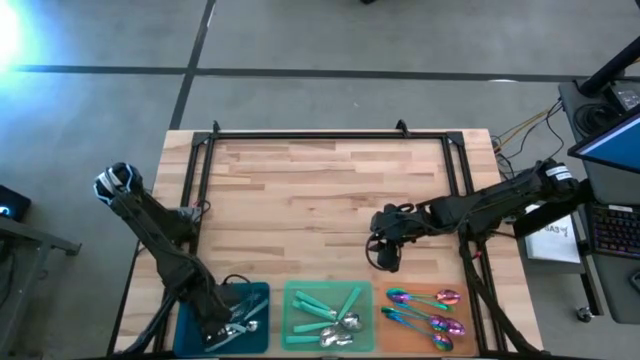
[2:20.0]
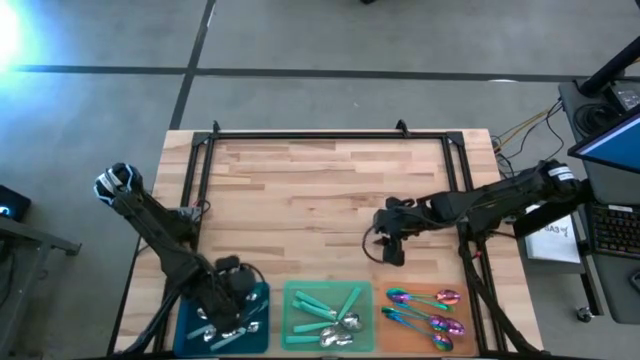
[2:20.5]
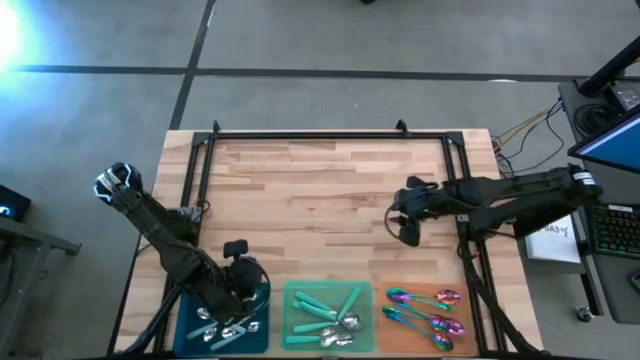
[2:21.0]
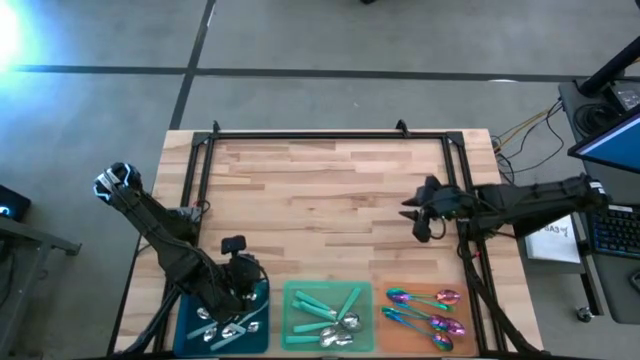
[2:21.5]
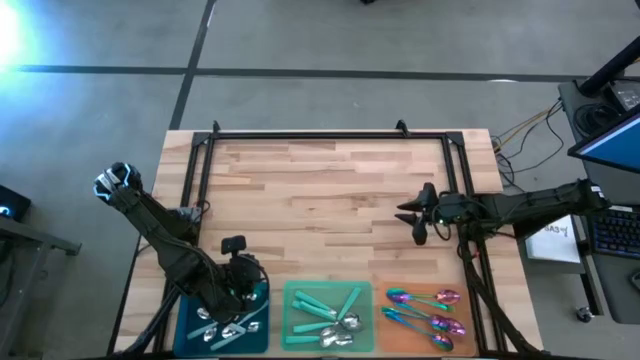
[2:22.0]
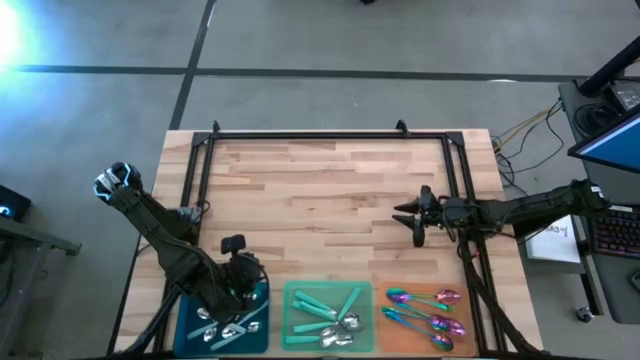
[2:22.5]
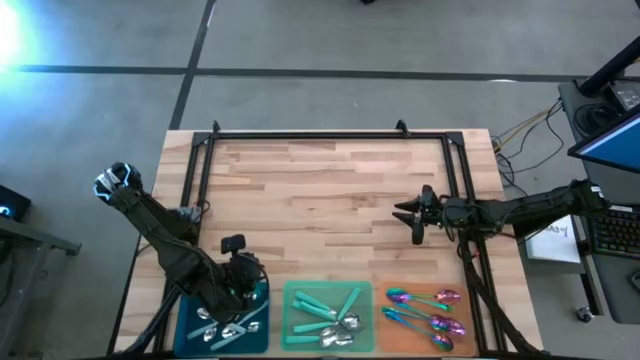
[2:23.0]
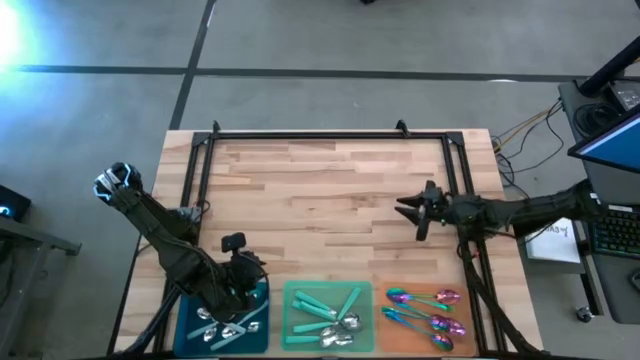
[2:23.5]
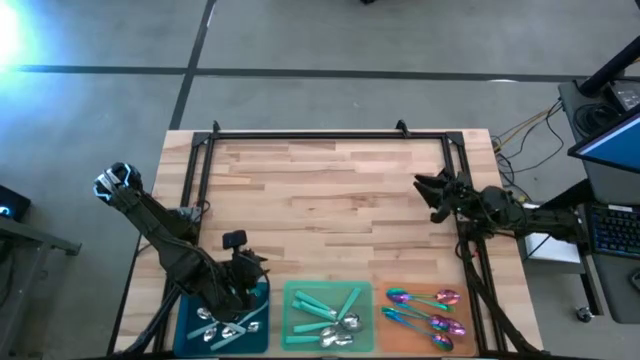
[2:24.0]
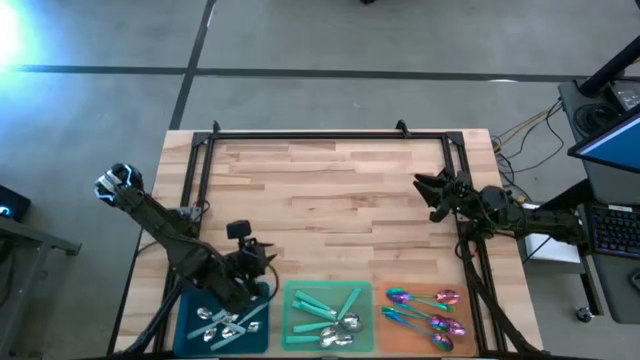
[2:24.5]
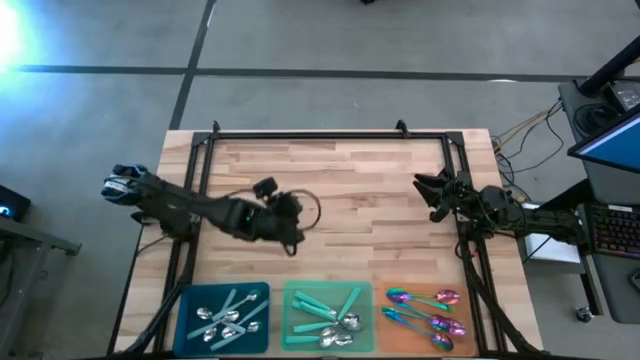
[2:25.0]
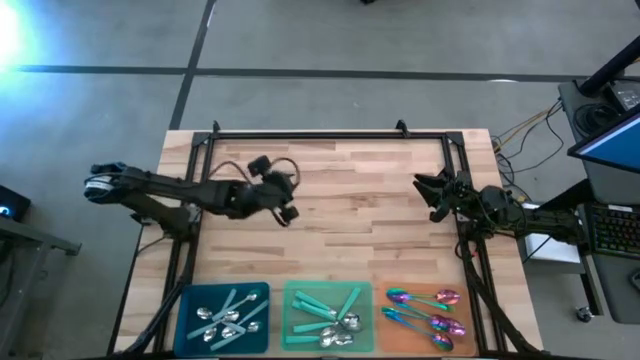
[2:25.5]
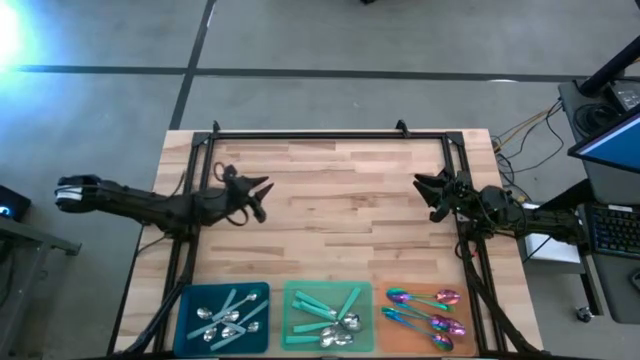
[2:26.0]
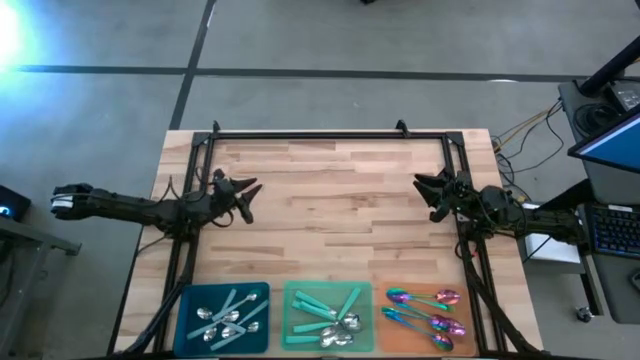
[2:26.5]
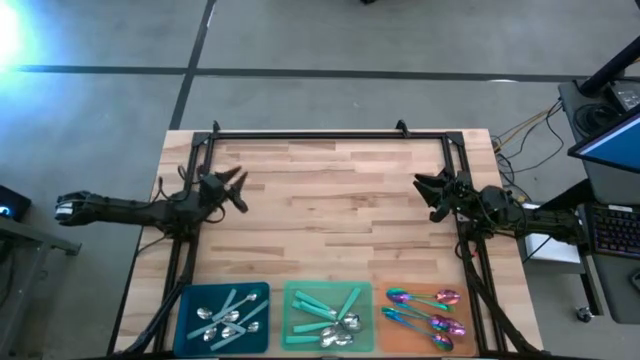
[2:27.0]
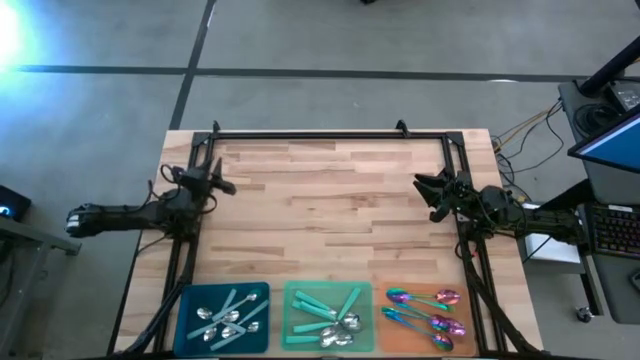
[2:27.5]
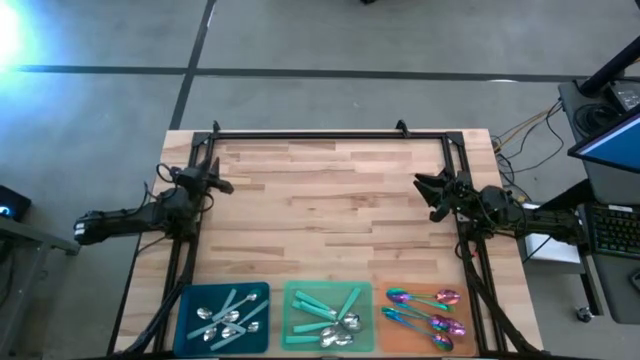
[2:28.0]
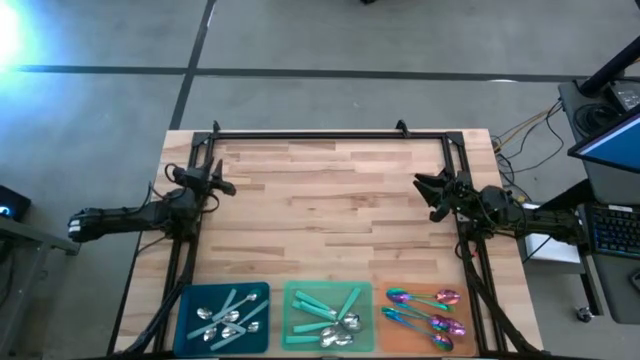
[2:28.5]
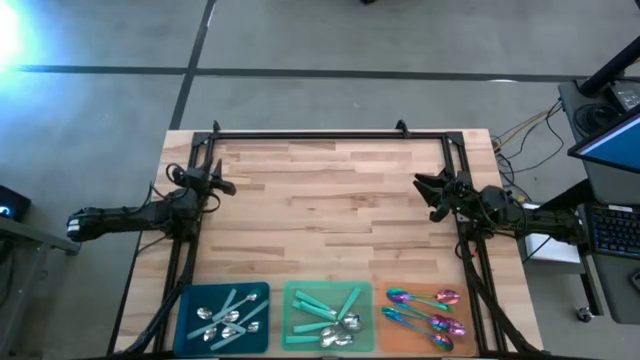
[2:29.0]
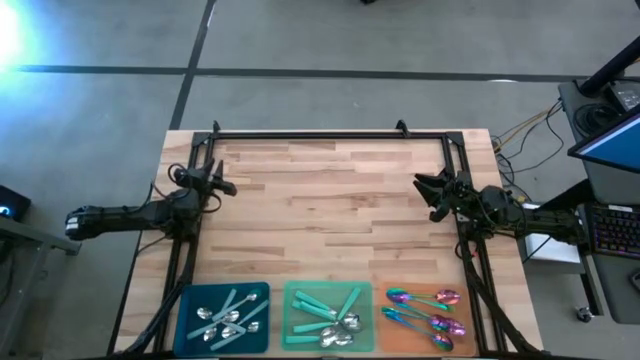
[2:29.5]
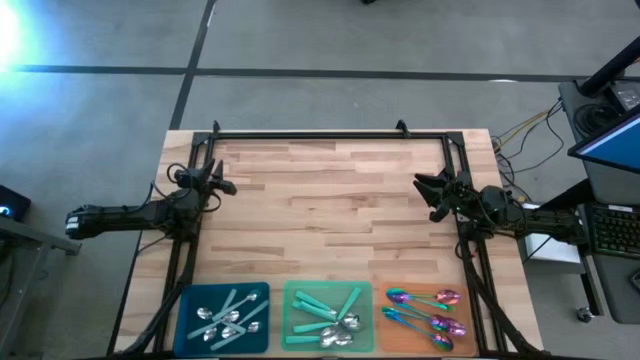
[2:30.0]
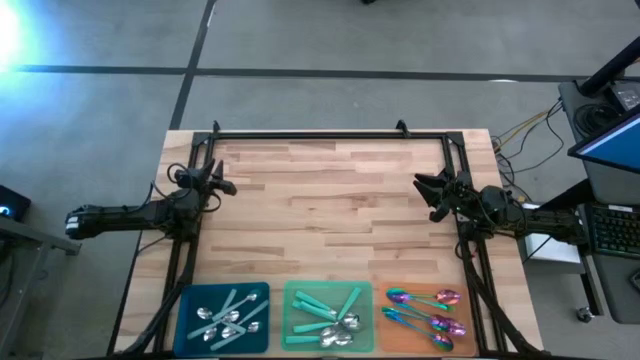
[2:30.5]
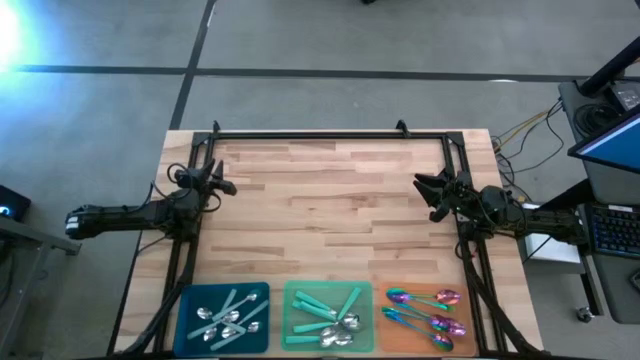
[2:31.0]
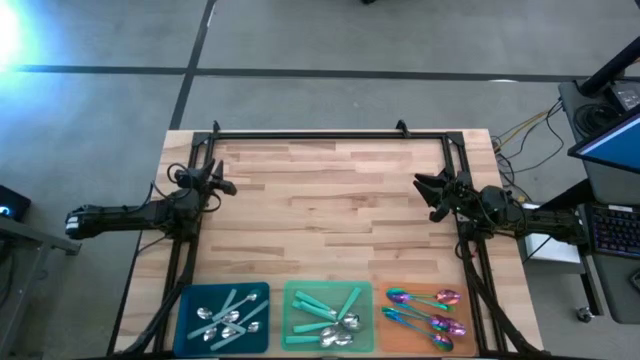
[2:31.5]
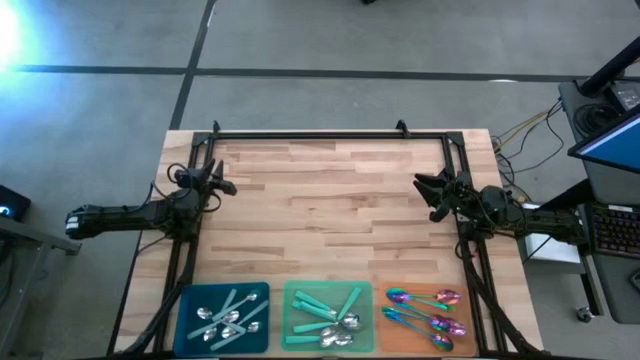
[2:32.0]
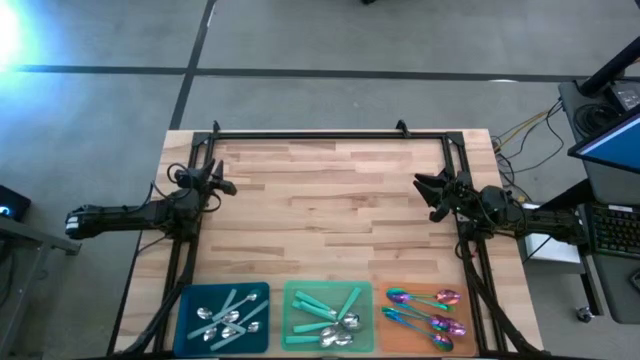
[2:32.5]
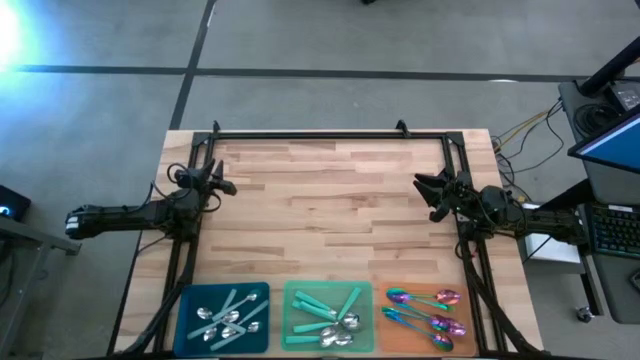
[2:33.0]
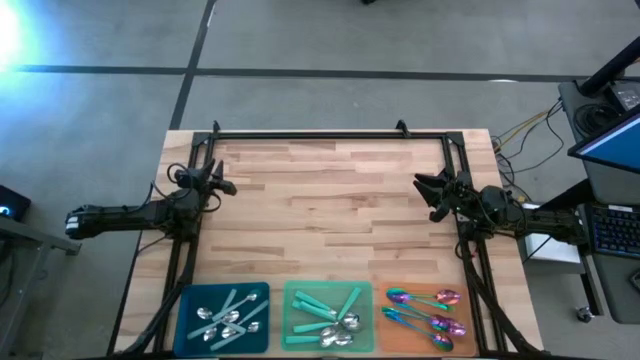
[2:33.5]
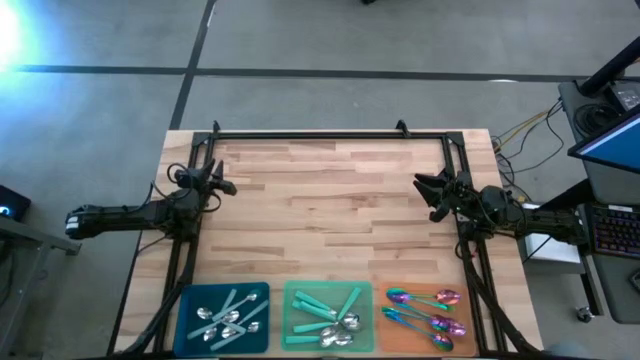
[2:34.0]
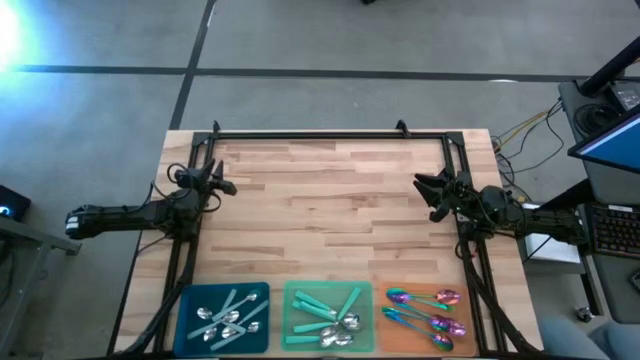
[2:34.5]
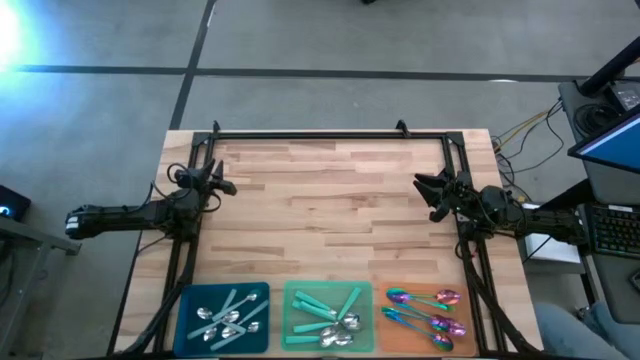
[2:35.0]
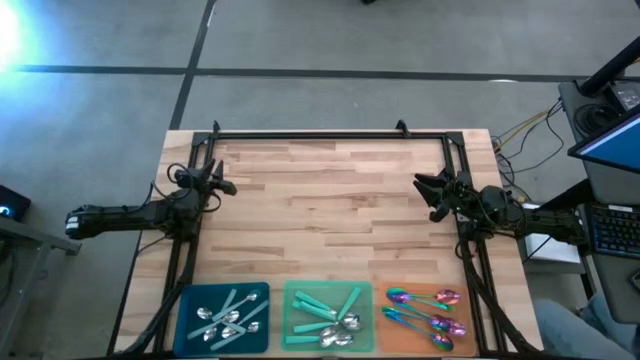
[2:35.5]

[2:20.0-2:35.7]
Task: Sort silverware by color (type)
Return to Home Position
